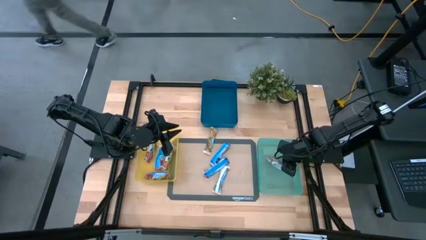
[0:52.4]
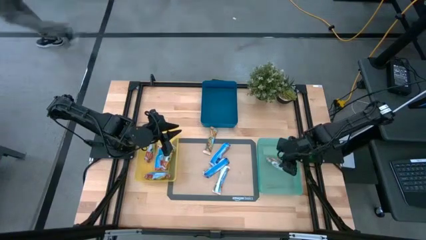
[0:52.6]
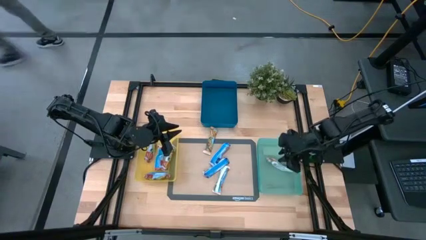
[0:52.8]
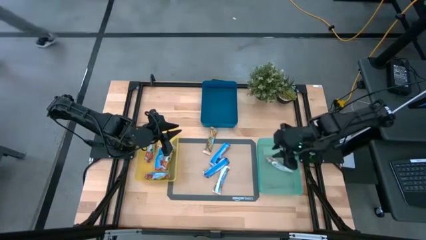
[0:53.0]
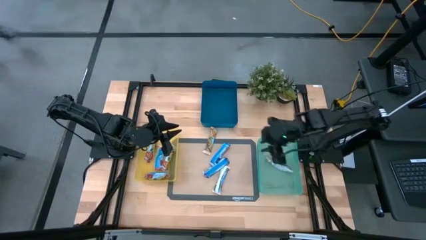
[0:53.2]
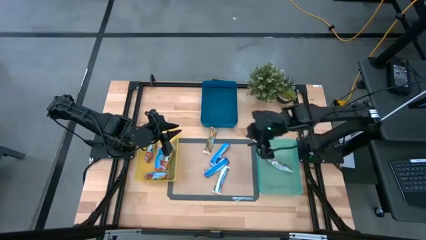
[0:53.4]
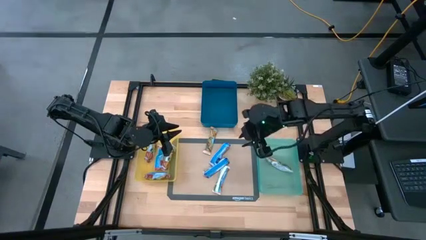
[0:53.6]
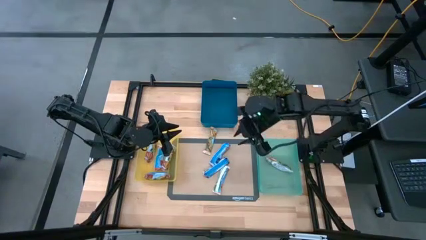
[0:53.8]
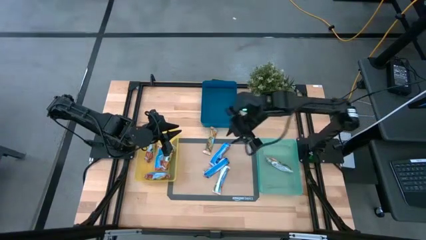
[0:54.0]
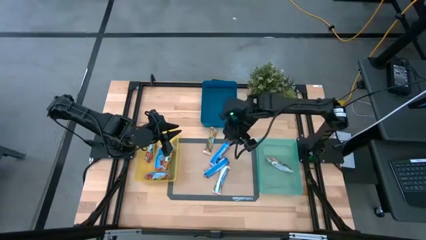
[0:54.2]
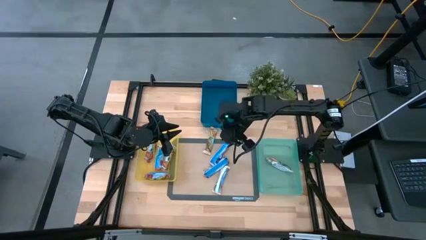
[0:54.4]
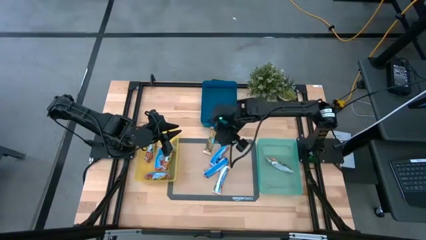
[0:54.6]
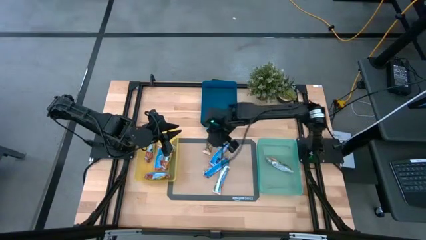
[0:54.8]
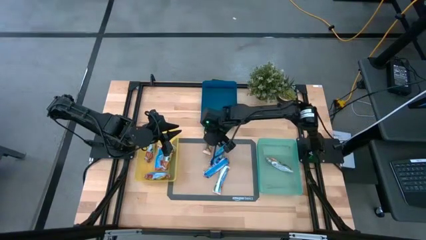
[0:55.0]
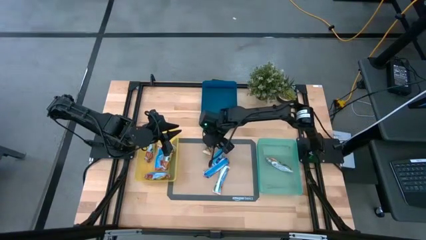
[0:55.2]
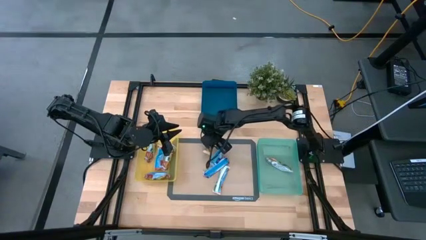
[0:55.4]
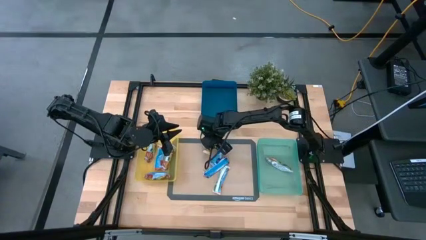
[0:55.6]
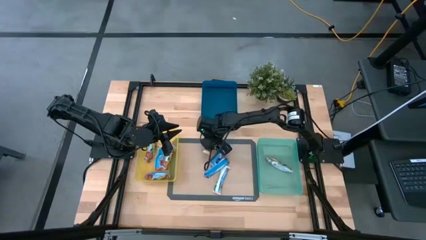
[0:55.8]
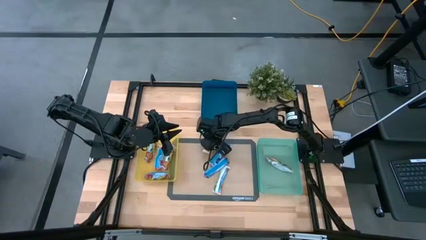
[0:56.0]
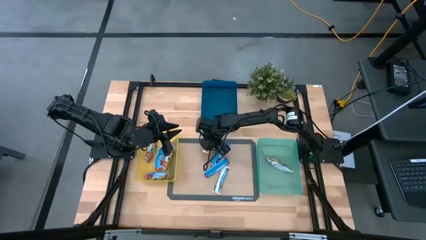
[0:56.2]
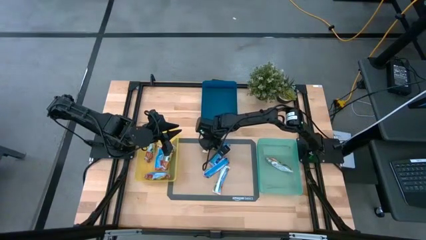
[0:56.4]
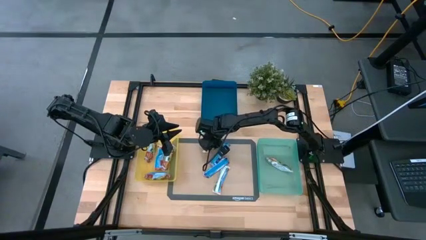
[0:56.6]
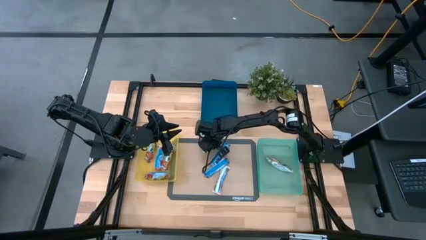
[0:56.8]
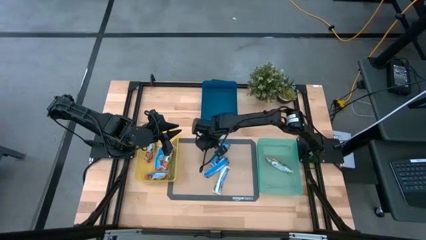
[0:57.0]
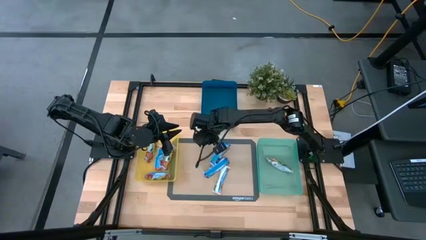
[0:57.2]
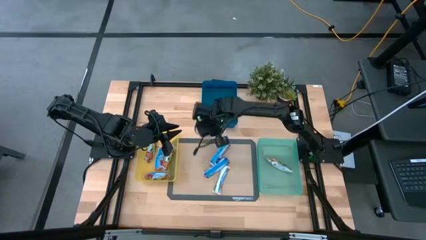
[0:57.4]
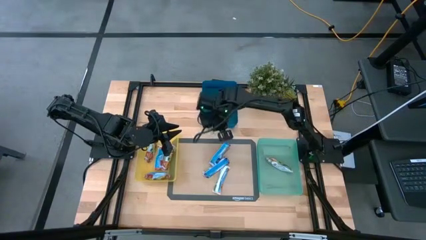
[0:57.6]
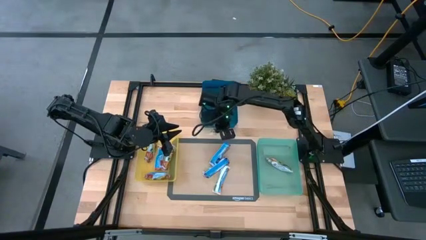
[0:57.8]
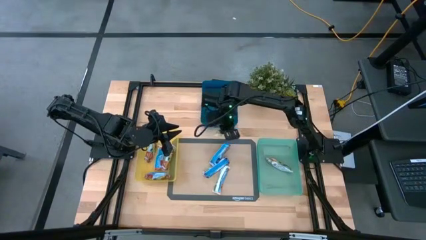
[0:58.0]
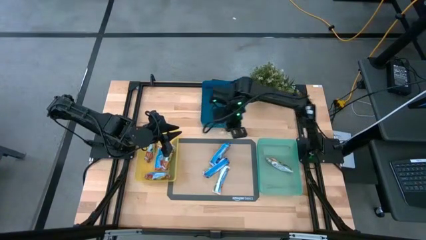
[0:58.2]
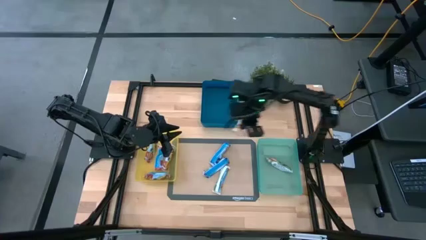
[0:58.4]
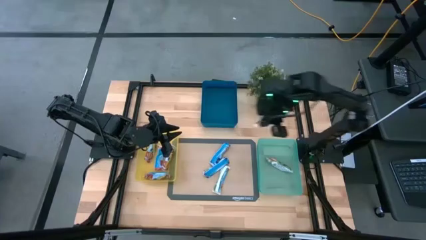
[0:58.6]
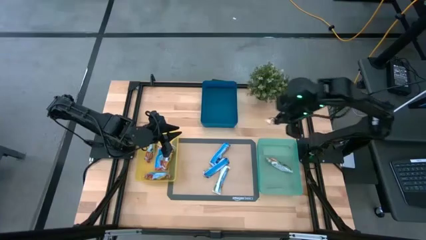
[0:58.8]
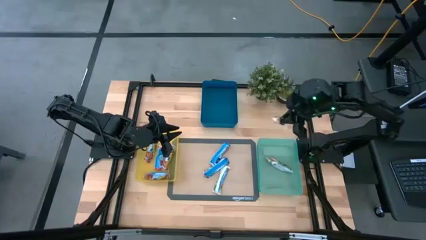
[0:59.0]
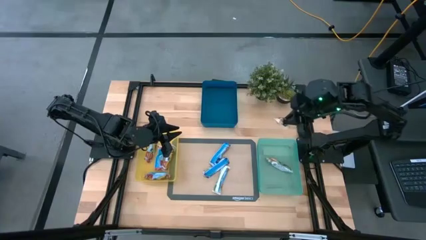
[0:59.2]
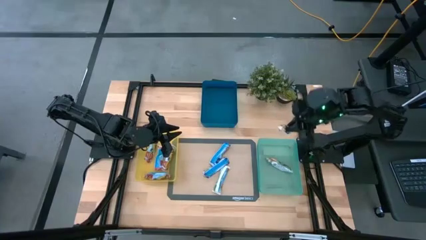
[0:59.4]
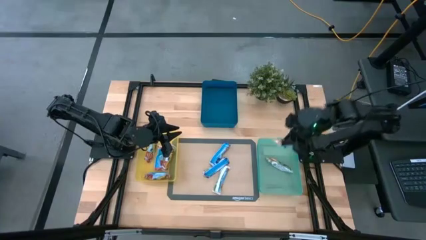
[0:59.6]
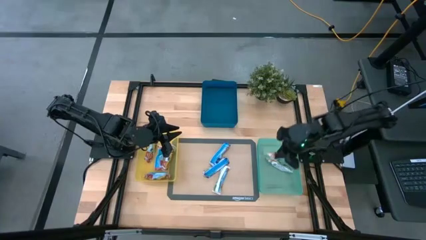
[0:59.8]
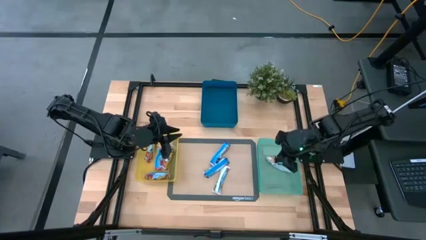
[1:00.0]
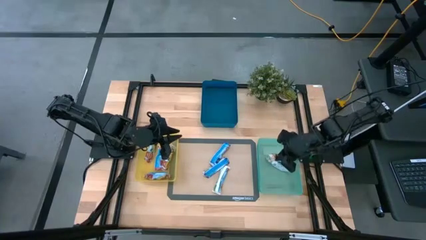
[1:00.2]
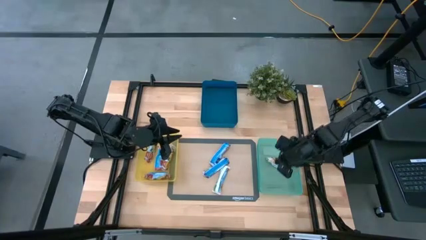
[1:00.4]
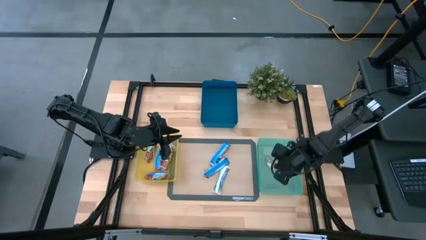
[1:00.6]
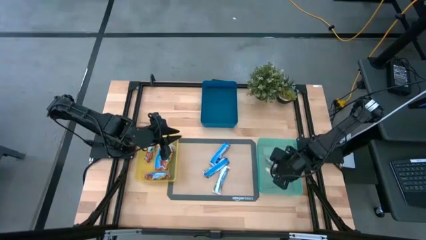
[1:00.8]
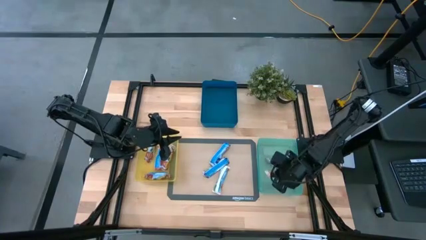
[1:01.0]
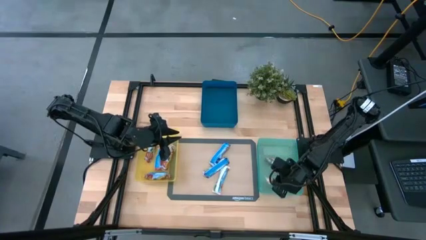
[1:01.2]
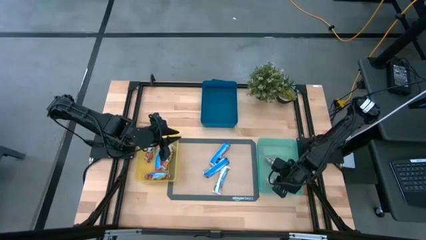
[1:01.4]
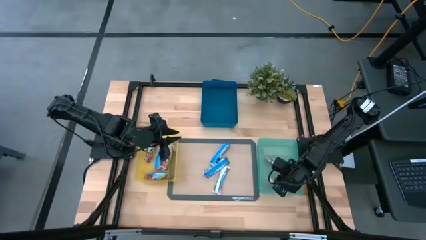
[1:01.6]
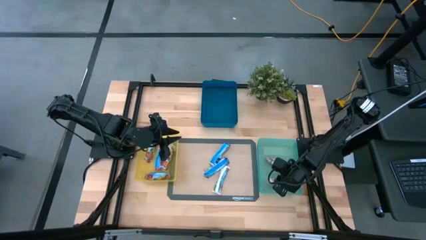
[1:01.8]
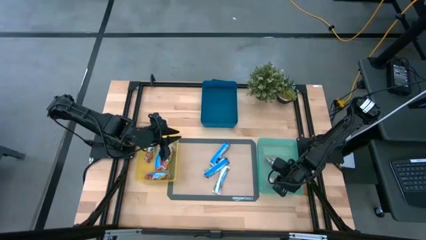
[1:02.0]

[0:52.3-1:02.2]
Task: Pick and place Granola Bars by type
Put the yellow granola bar into the green bin

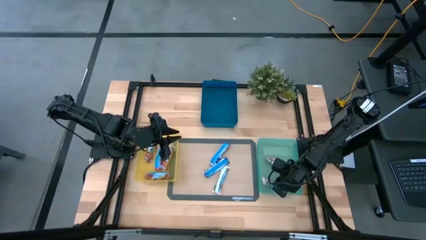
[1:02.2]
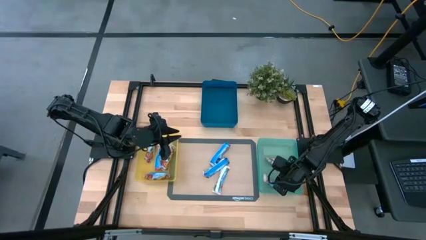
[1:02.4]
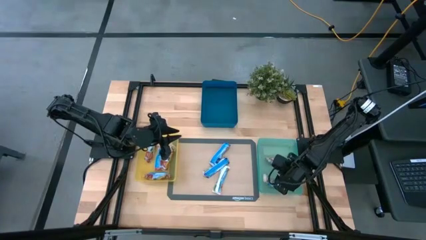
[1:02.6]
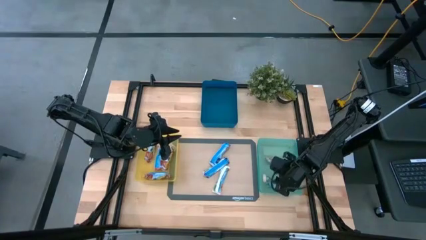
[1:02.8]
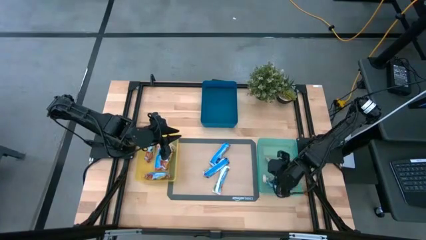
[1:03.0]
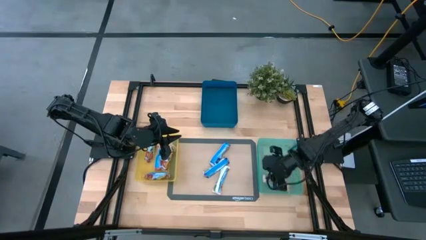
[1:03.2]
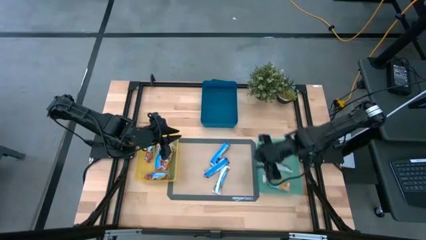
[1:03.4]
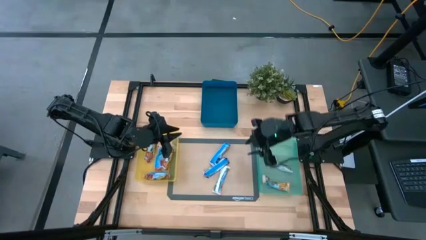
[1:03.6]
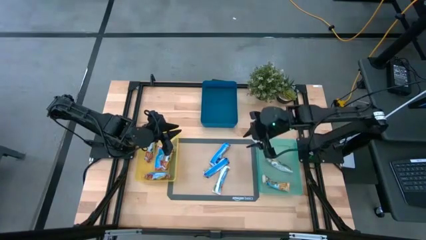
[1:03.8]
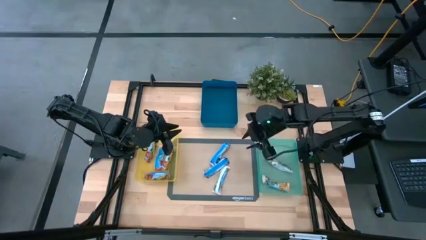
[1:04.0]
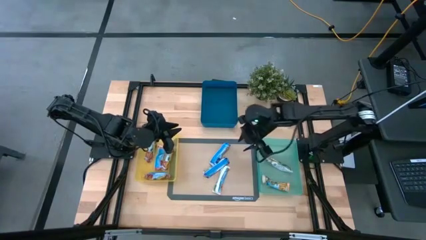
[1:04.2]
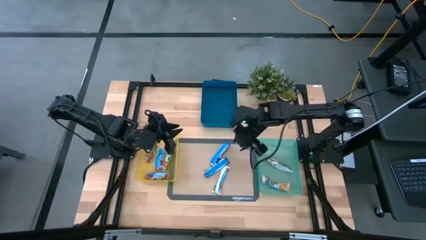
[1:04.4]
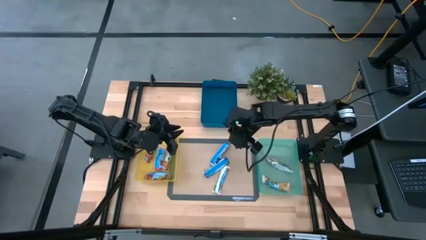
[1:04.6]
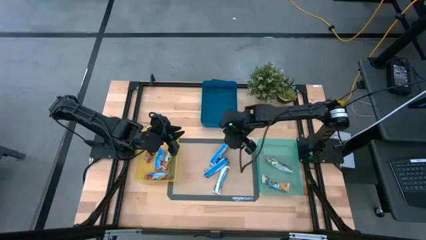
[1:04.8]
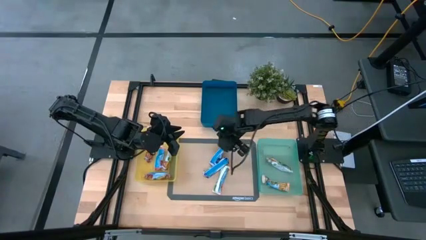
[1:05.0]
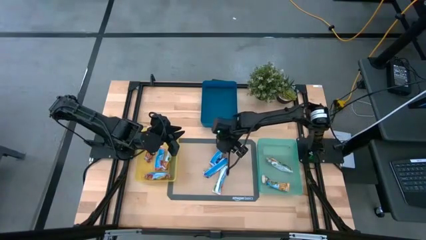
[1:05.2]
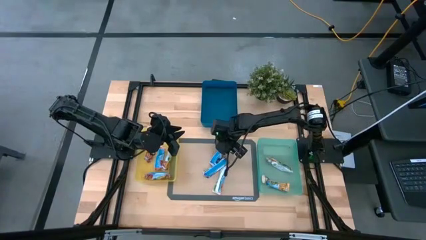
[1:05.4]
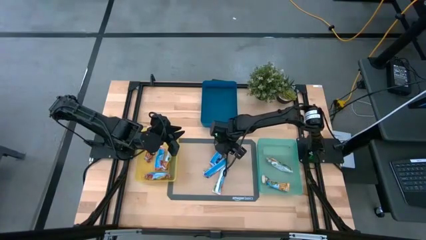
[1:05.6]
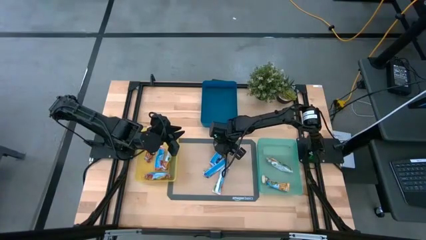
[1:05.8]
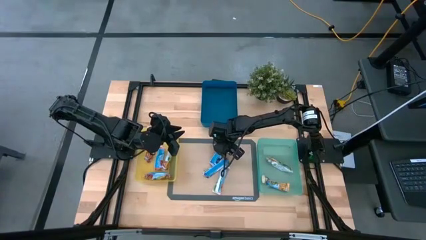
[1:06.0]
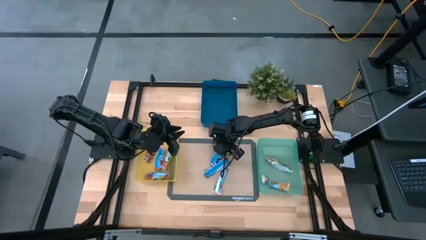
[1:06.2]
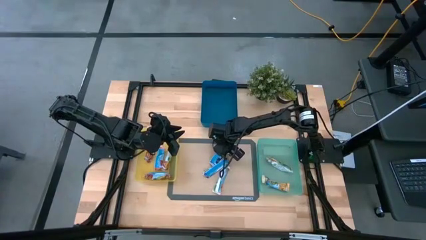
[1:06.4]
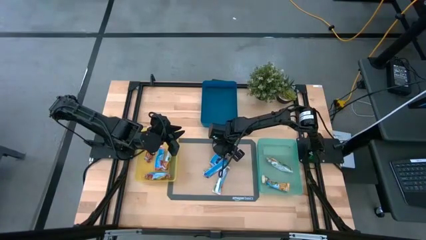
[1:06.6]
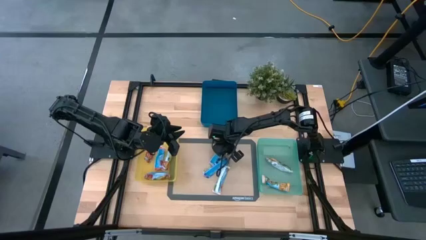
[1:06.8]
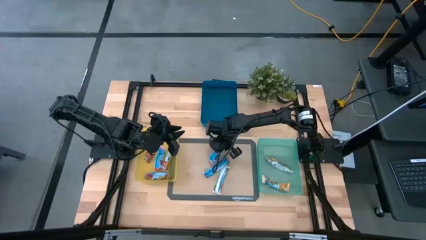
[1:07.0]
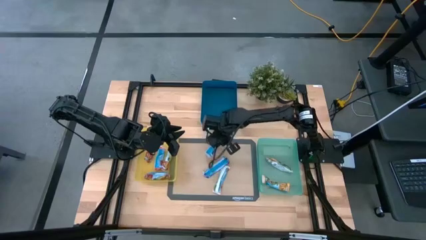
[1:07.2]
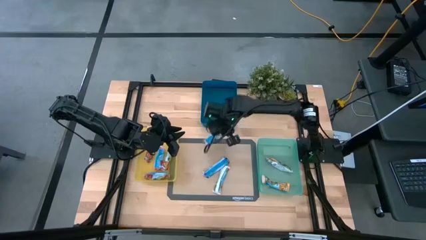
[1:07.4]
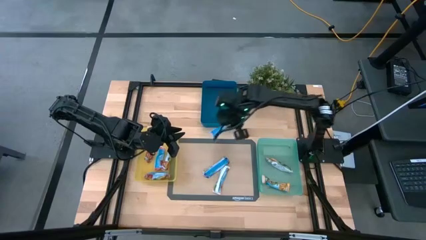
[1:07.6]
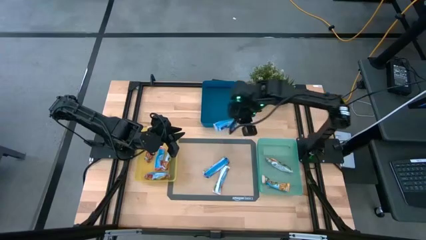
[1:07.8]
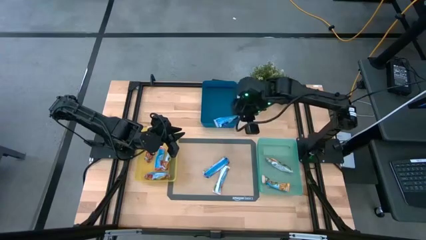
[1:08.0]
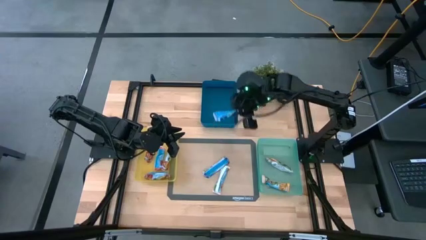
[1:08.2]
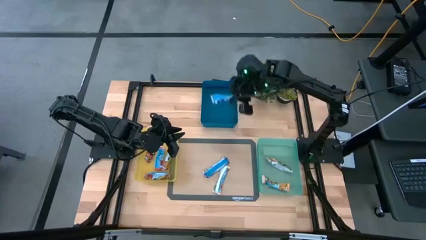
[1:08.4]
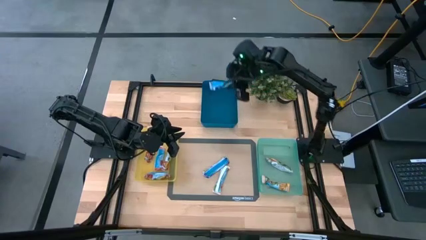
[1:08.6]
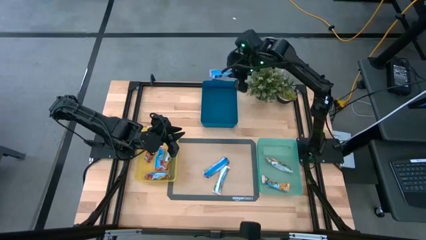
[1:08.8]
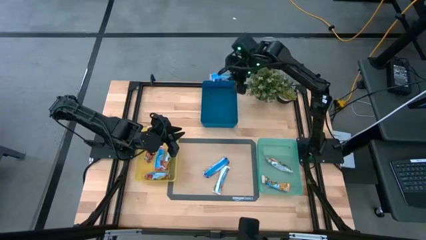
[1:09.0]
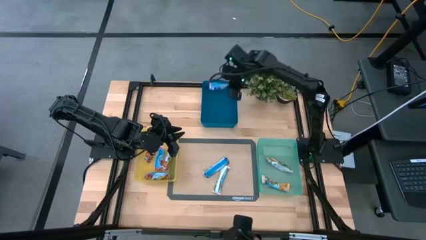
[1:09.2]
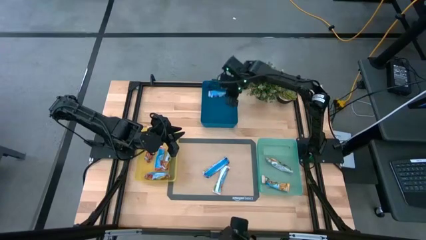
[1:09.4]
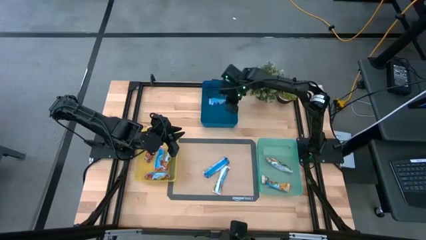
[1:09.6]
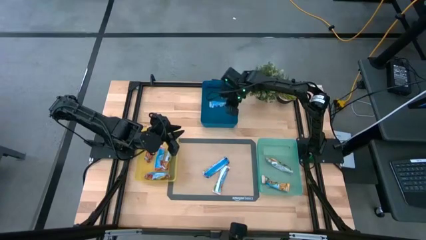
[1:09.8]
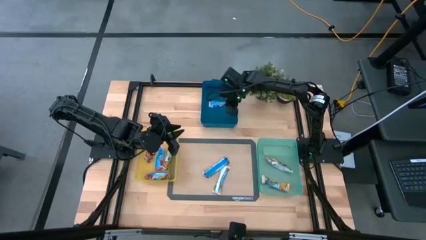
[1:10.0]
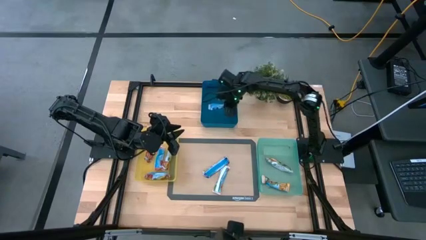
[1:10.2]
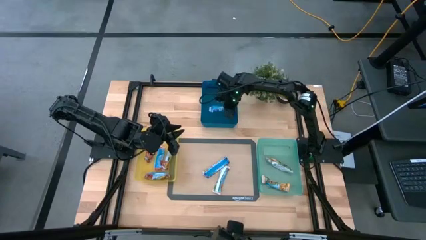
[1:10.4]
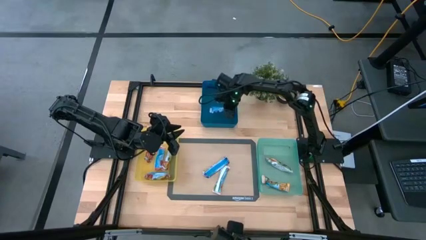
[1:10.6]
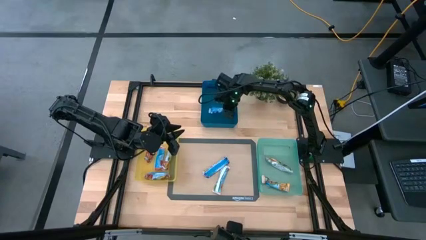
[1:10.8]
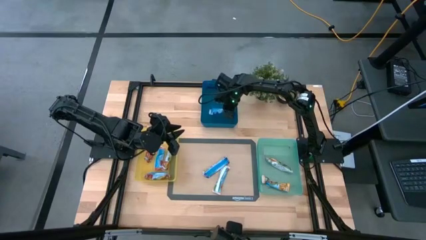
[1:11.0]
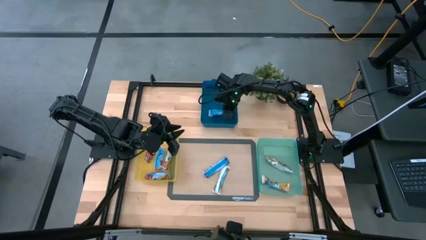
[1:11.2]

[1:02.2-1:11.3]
Put the blue granola bar into the blue bin
